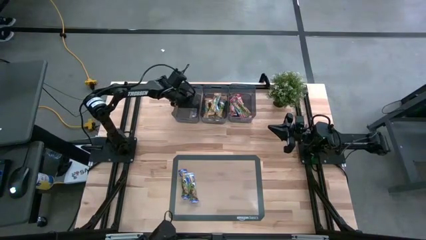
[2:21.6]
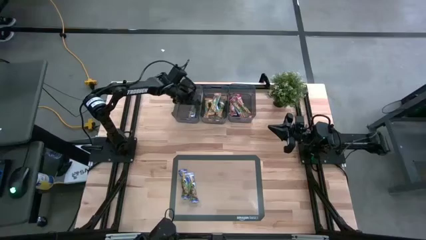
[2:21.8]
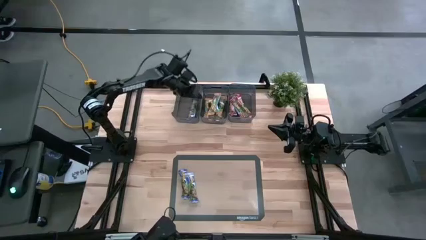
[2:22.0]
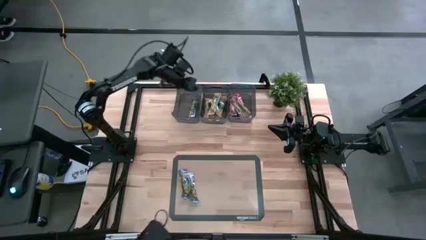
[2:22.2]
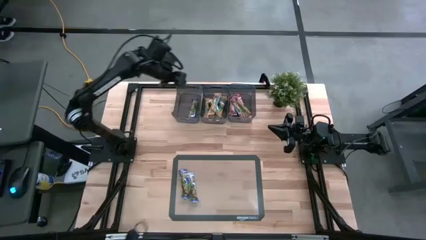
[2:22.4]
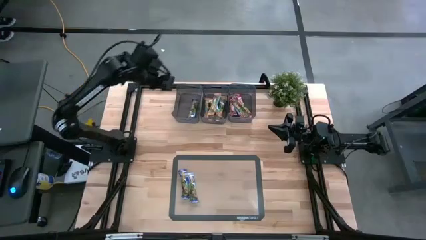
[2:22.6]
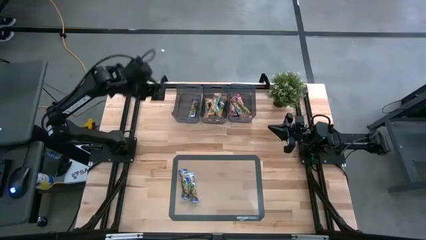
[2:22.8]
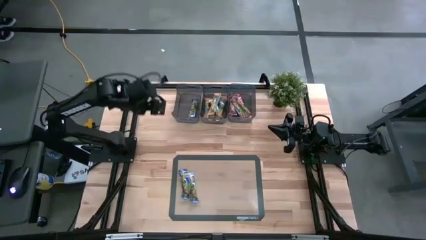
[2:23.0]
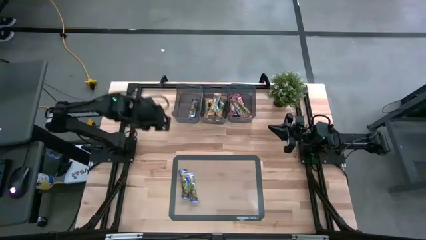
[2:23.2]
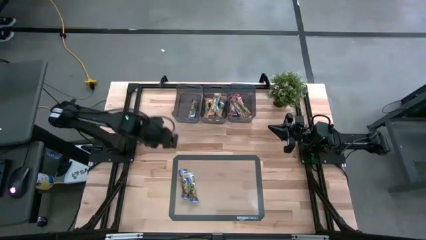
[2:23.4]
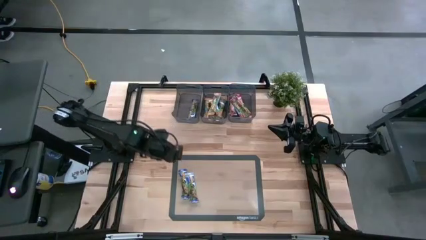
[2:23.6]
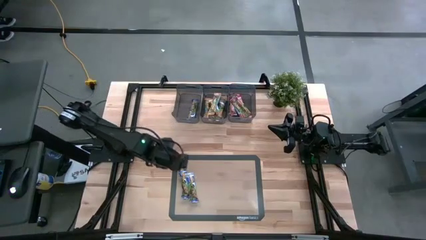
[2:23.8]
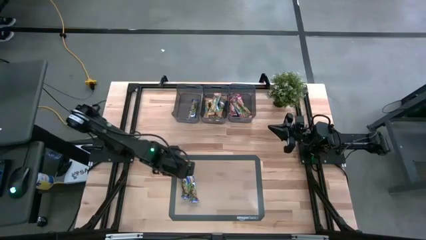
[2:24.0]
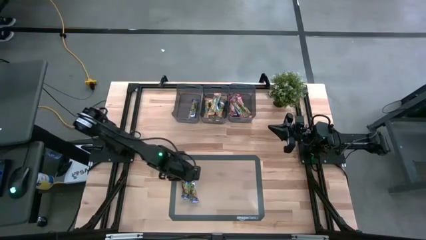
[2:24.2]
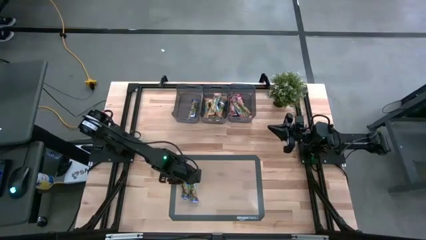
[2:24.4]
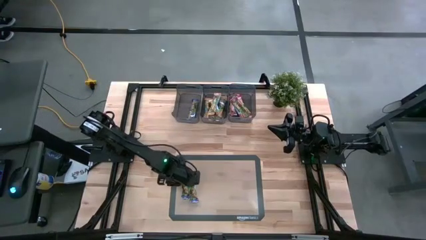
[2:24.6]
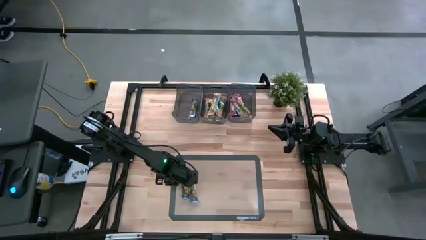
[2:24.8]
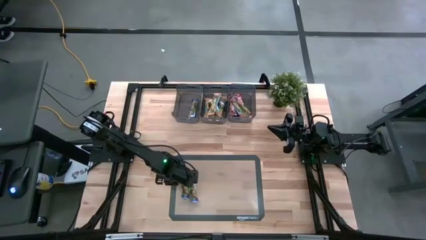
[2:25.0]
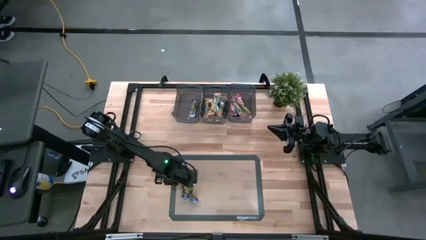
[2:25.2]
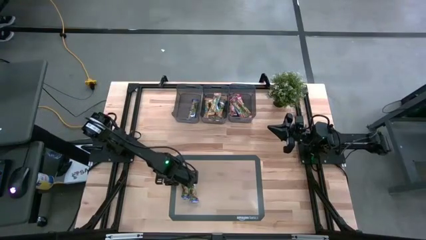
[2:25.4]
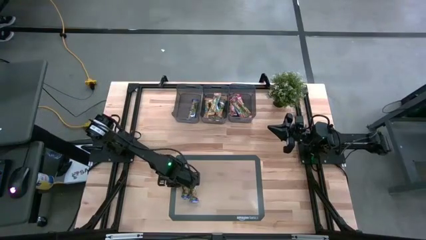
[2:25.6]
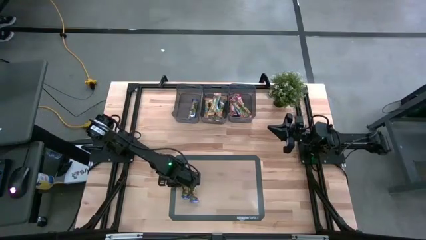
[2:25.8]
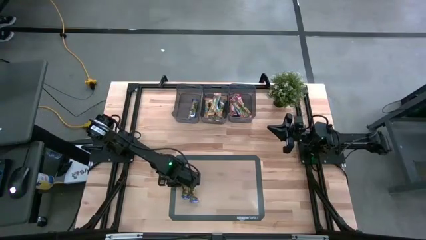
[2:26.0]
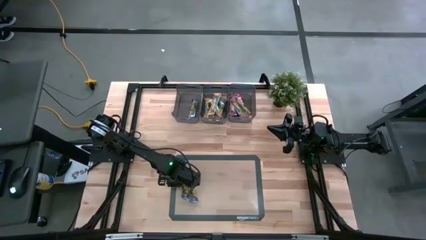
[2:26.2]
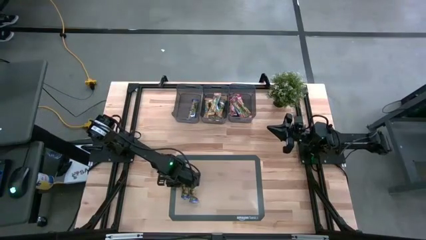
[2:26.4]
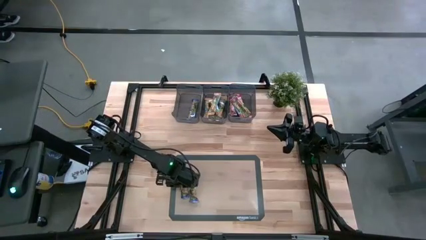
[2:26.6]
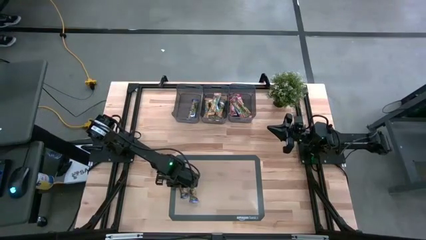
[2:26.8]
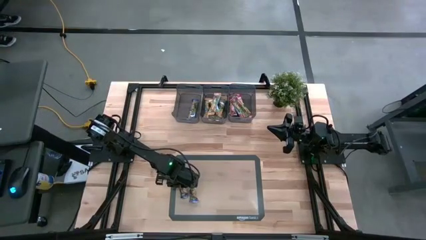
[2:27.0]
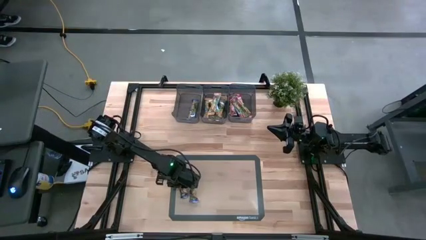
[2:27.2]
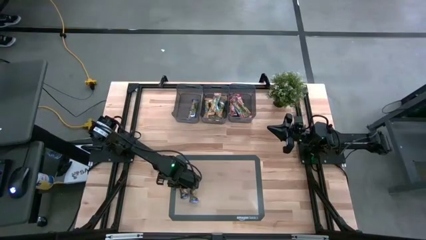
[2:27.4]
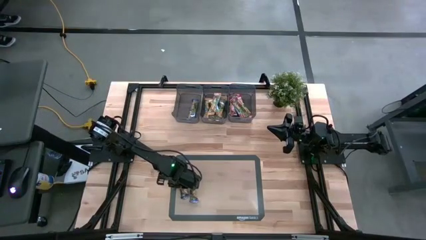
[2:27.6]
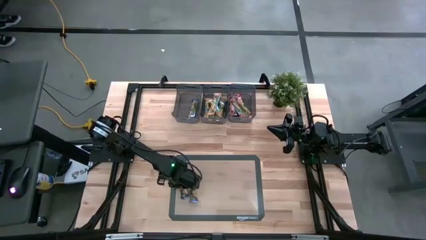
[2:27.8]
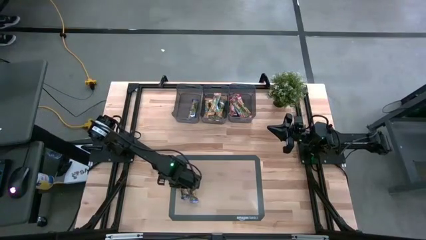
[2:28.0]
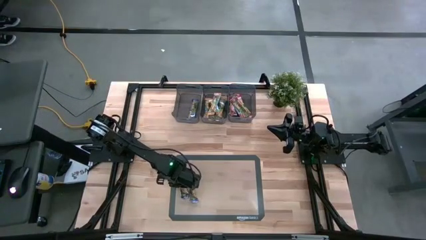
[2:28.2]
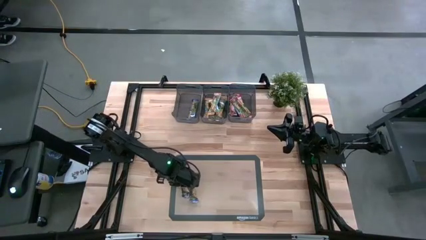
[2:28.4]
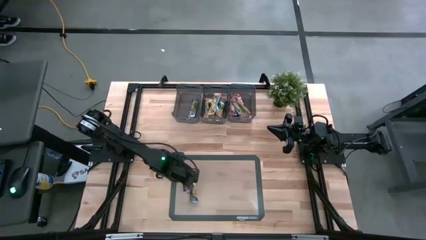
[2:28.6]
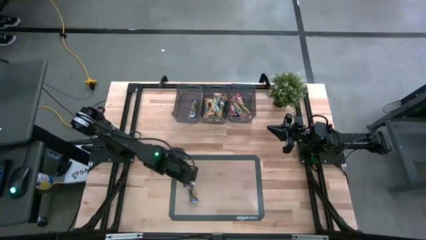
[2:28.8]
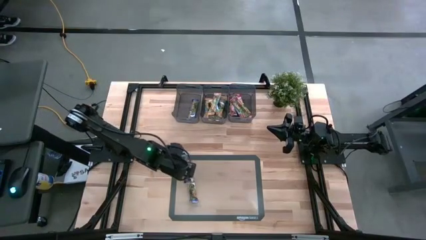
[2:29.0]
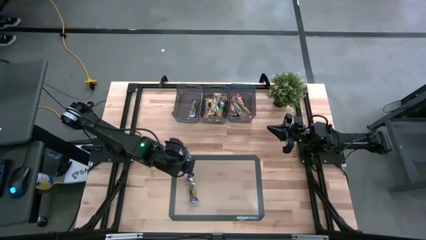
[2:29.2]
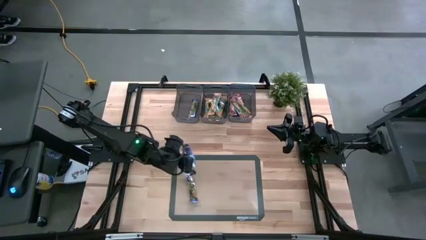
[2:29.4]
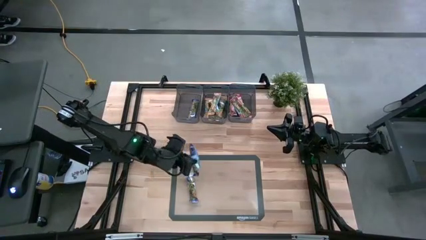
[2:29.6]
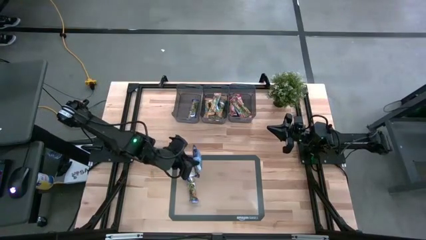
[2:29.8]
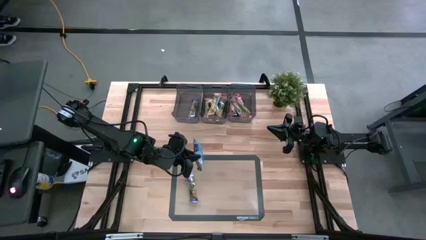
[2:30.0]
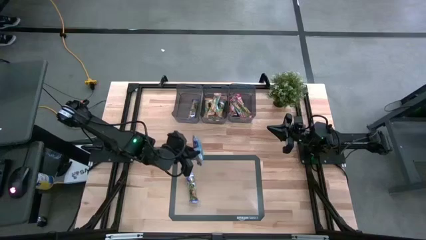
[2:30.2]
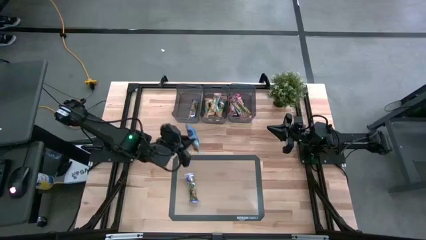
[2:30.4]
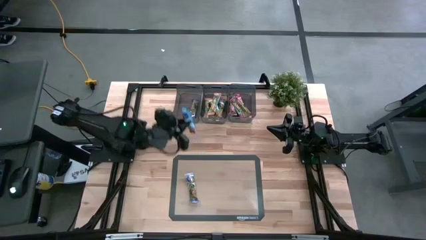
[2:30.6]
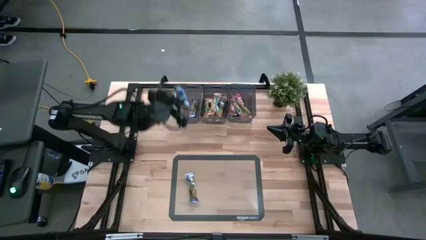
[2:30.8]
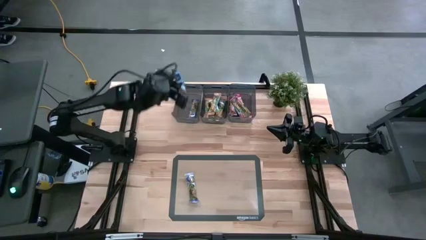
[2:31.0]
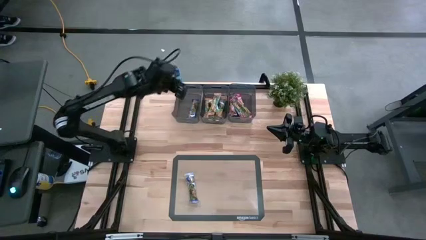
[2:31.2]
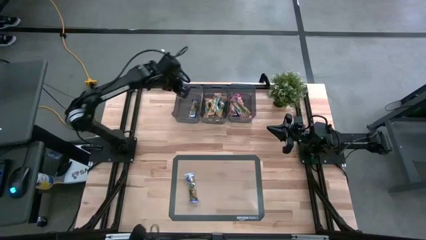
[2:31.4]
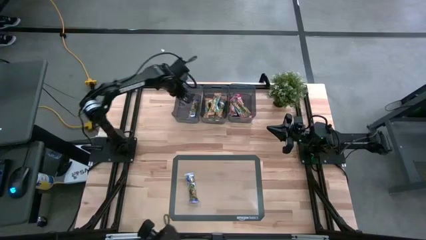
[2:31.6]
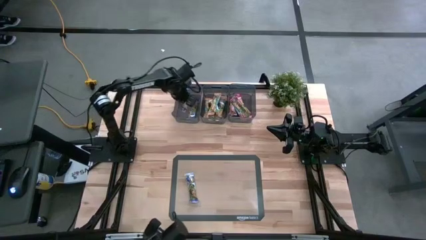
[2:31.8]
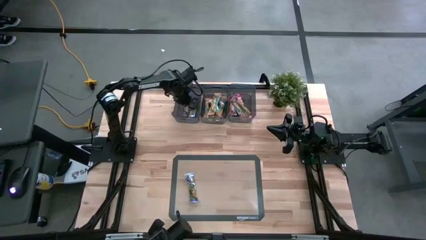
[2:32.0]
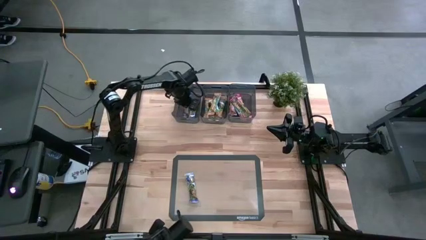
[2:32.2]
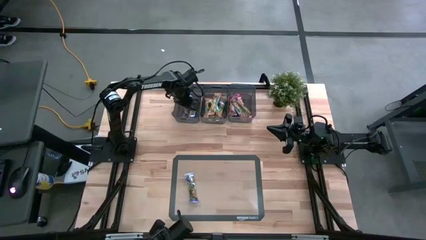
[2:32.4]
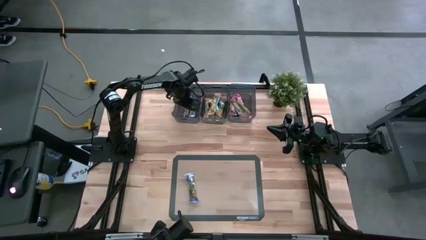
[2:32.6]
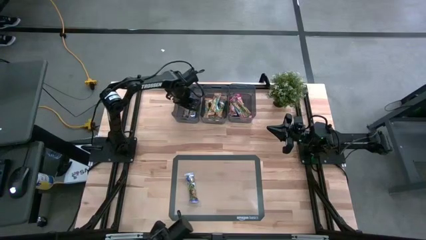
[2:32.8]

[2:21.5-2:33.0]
Task: Pick and place Granola Bars by type
Put the blue granola bar into the left black bin

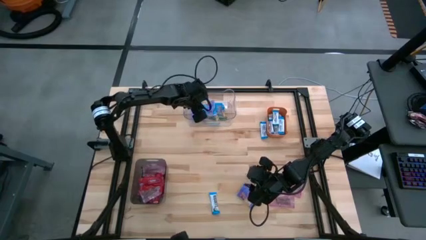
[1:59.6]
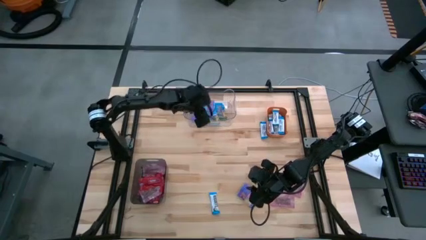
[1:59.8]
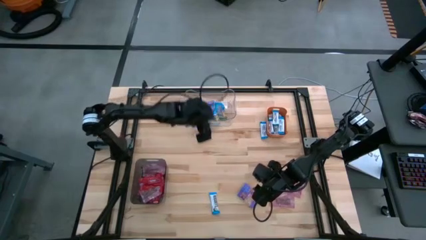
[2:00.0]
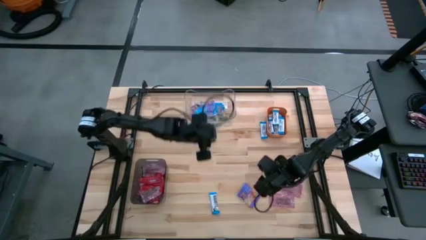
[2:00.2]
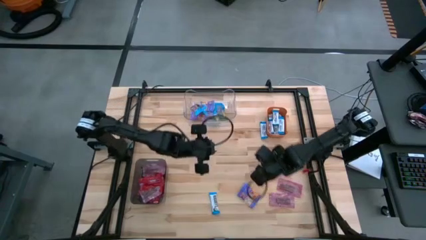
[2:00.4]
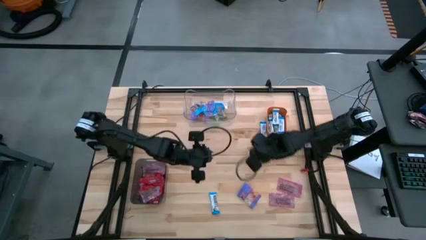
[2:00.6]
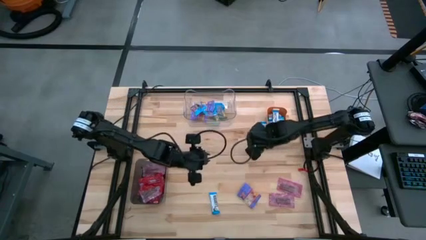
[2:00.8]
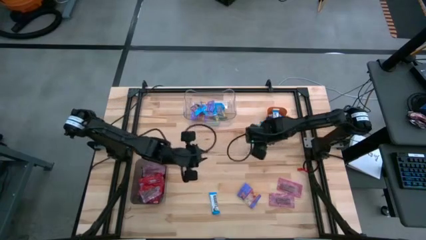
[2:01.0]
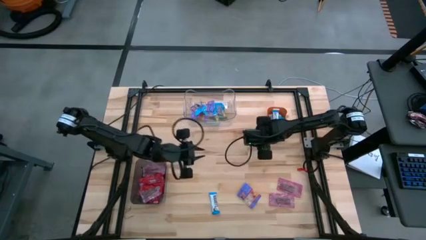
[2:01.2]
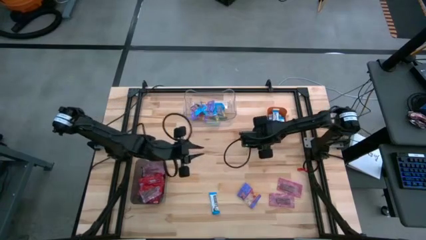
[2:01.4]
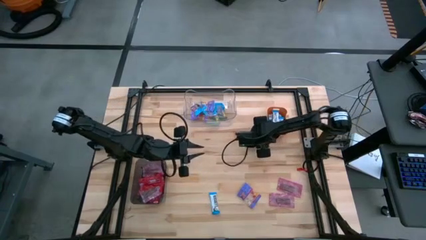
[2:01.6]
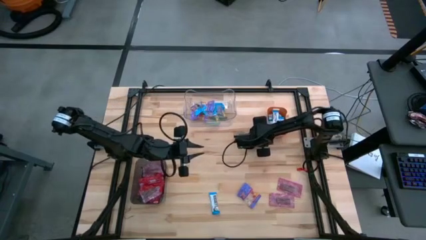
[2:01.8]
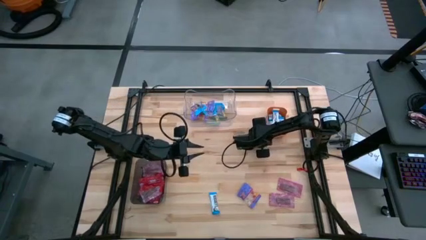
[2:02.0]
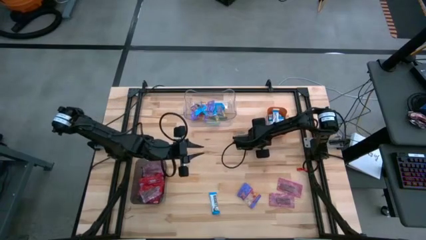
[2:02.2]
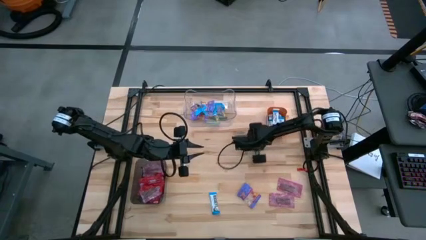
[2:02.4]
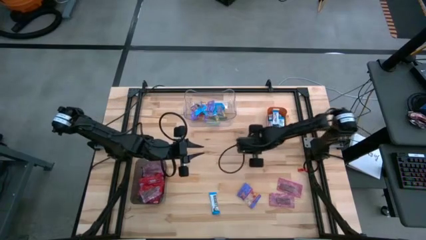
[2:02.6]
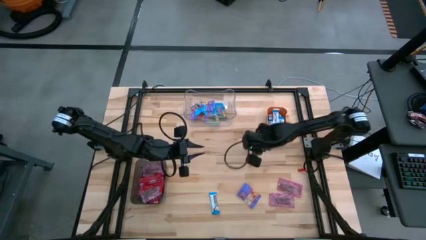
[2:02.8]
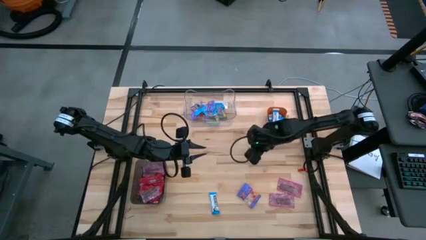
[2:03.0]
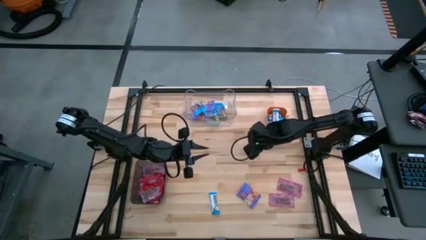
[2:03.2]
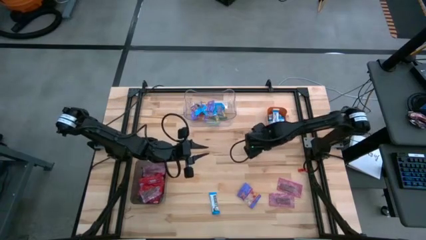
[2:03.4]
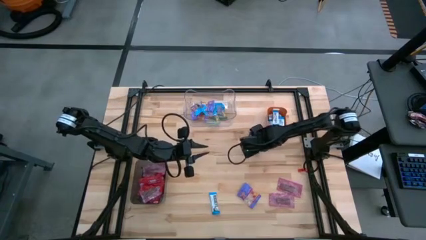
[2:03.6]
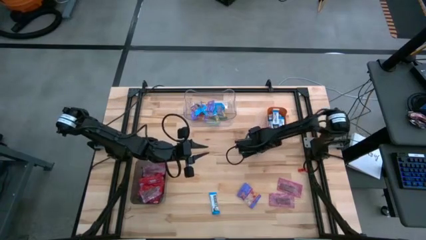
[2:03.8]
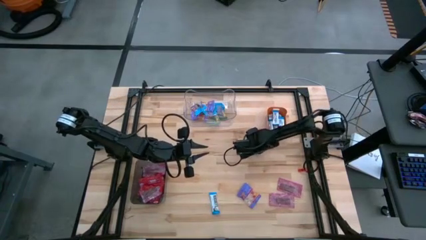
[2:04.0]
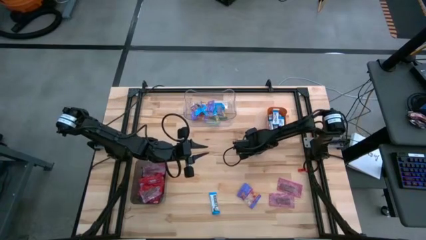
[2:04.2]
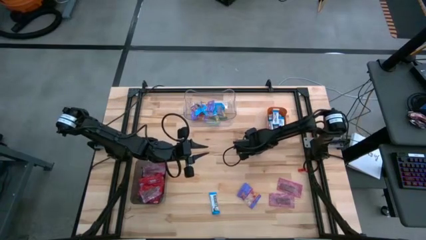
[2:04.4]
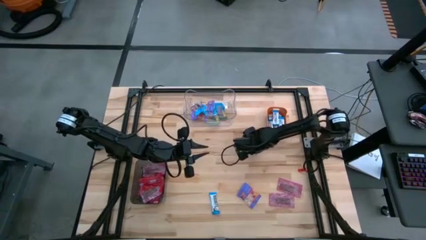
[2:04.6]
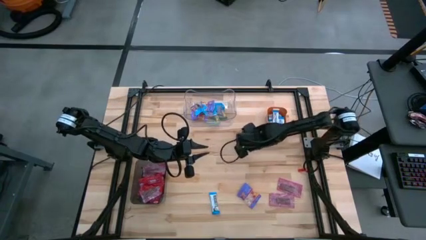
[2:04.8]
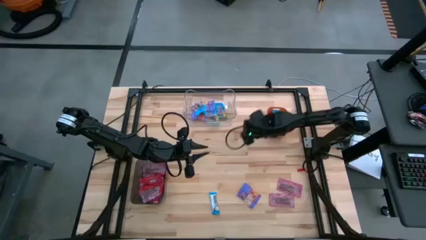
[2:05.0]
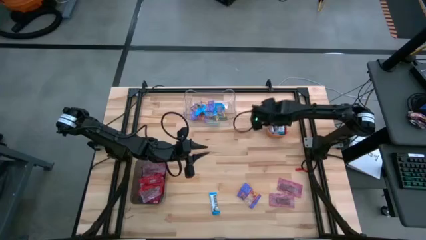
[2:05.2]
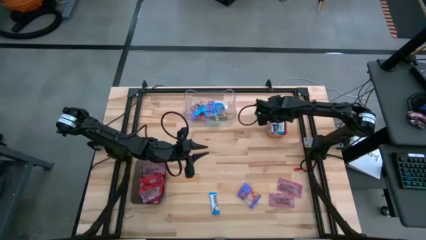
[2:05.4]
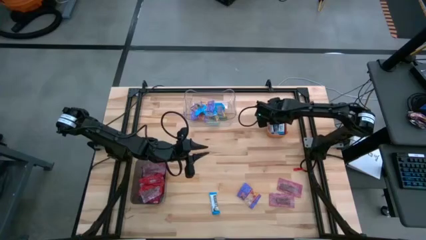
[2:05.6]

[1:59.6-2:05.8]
Task: Sort candy
Put the white chocolate into the orange bin
